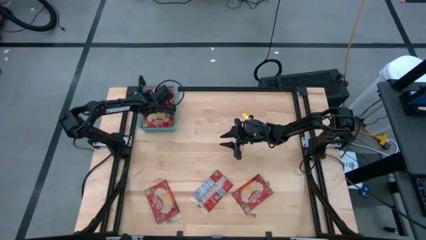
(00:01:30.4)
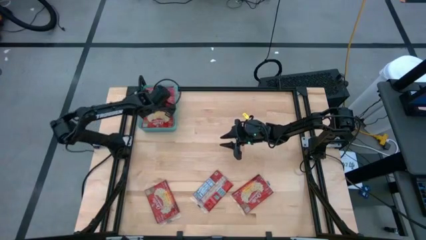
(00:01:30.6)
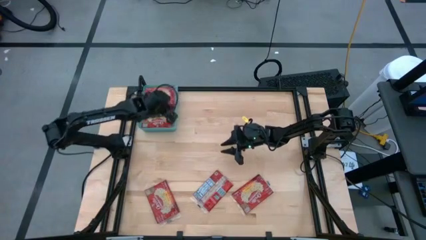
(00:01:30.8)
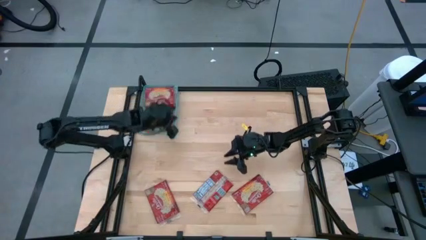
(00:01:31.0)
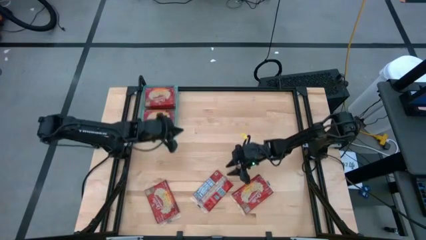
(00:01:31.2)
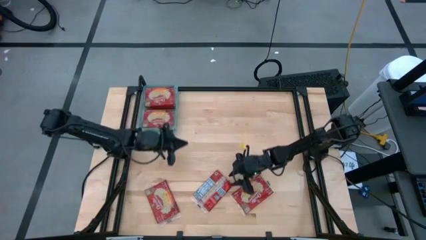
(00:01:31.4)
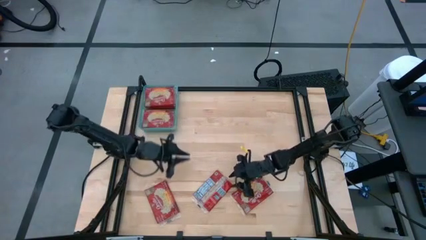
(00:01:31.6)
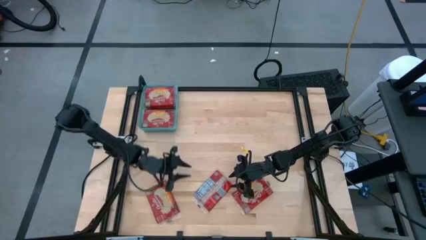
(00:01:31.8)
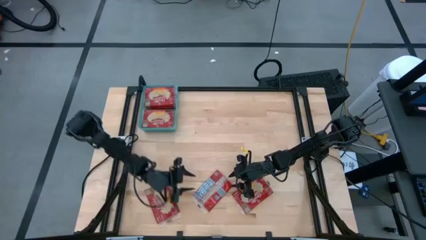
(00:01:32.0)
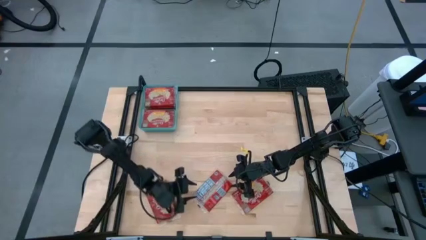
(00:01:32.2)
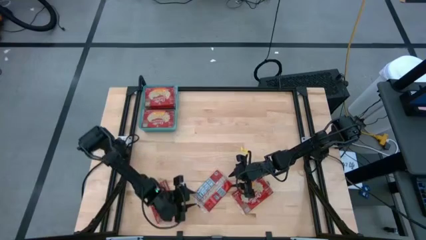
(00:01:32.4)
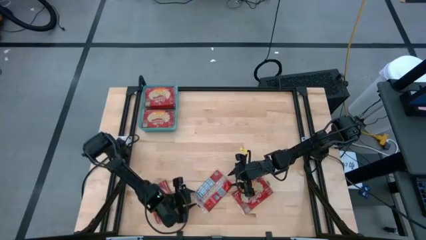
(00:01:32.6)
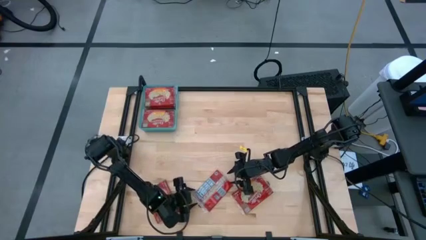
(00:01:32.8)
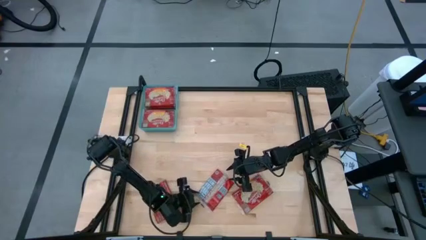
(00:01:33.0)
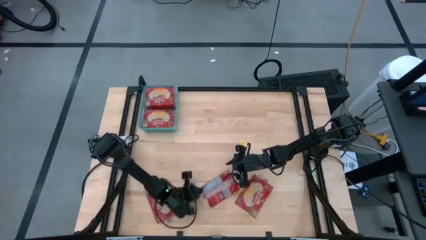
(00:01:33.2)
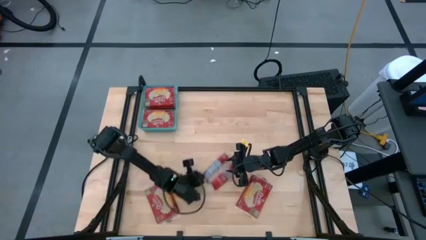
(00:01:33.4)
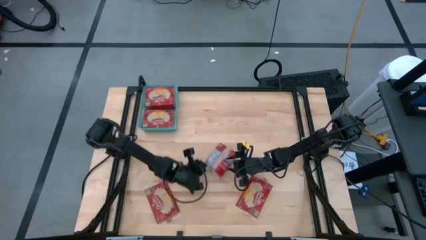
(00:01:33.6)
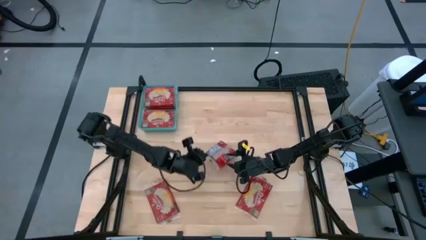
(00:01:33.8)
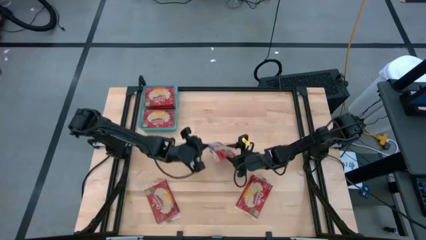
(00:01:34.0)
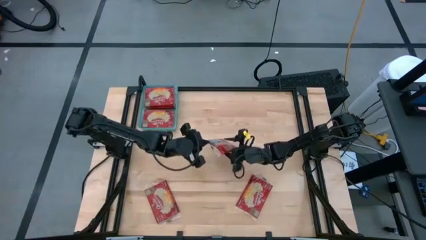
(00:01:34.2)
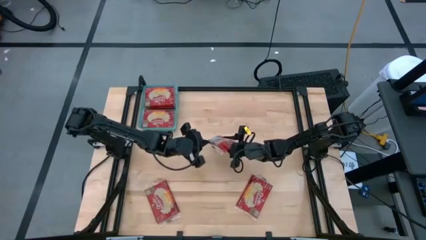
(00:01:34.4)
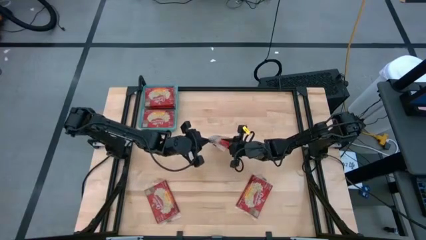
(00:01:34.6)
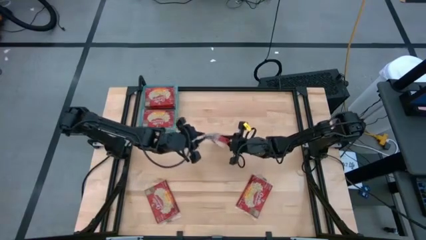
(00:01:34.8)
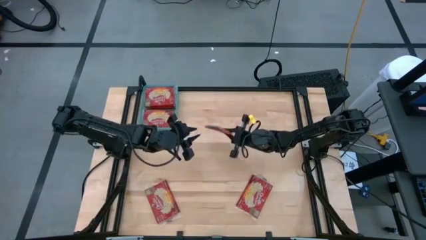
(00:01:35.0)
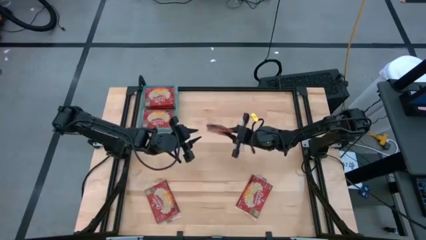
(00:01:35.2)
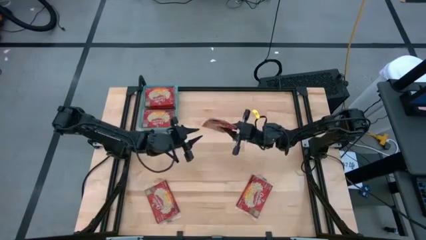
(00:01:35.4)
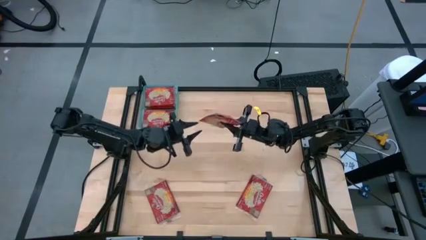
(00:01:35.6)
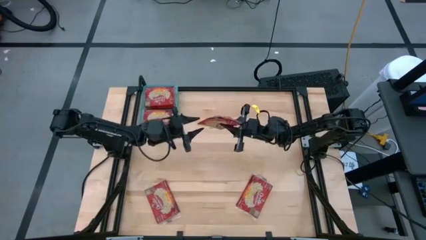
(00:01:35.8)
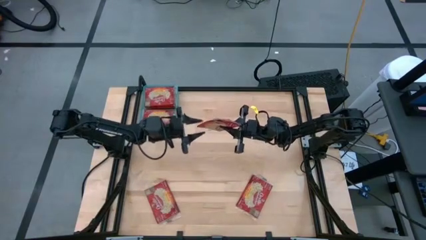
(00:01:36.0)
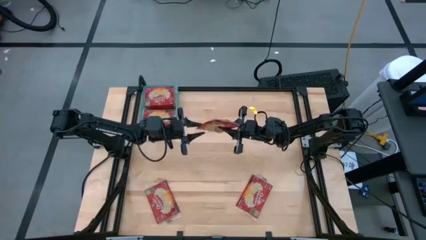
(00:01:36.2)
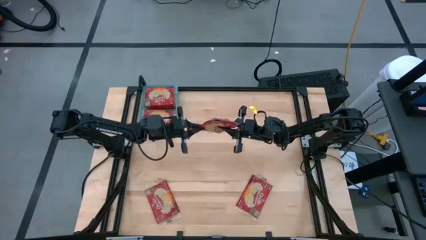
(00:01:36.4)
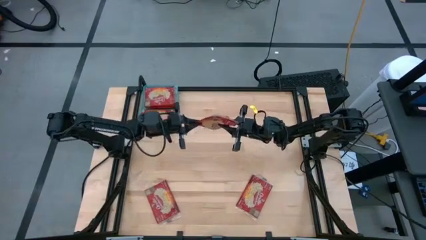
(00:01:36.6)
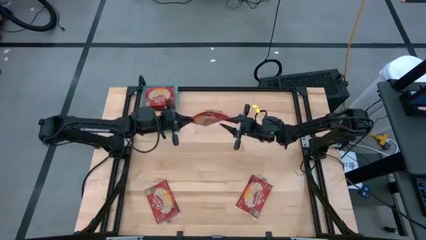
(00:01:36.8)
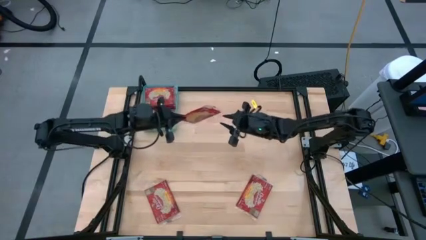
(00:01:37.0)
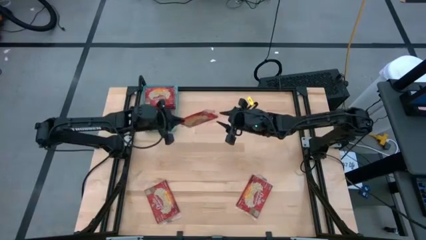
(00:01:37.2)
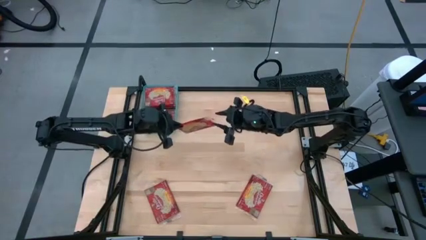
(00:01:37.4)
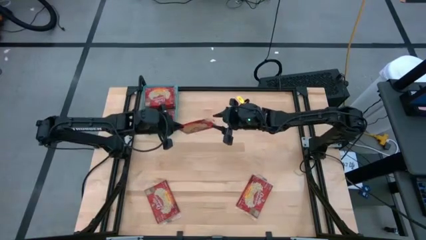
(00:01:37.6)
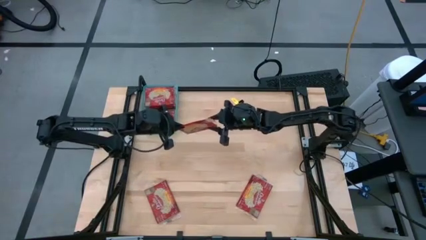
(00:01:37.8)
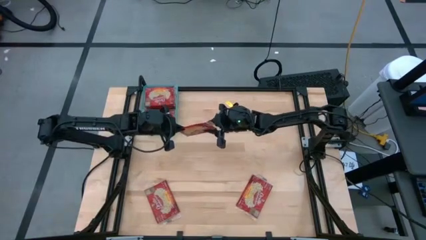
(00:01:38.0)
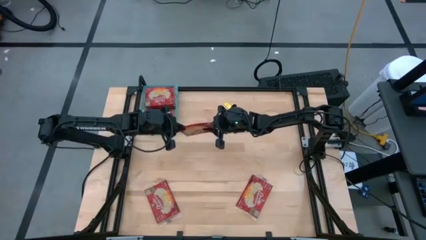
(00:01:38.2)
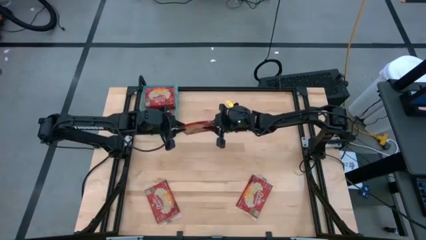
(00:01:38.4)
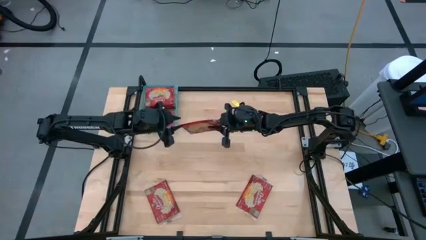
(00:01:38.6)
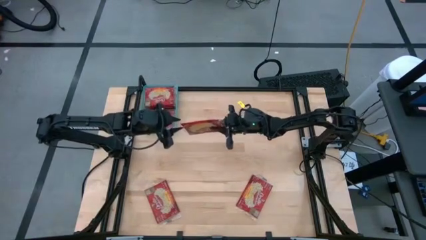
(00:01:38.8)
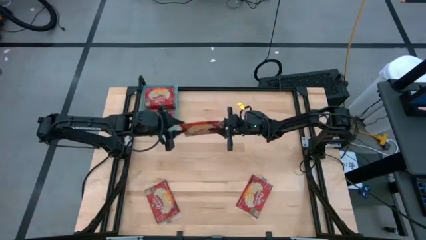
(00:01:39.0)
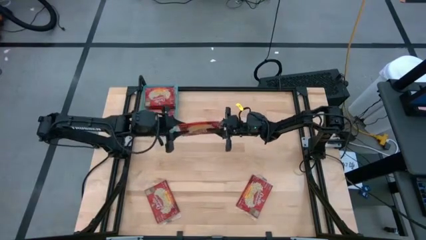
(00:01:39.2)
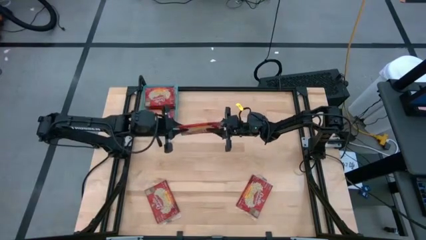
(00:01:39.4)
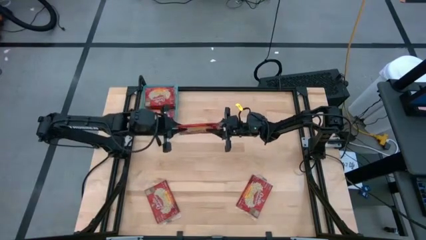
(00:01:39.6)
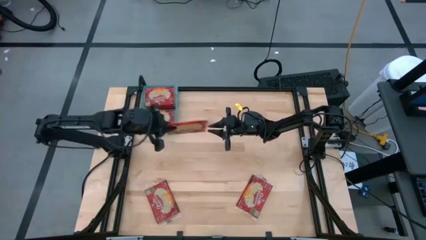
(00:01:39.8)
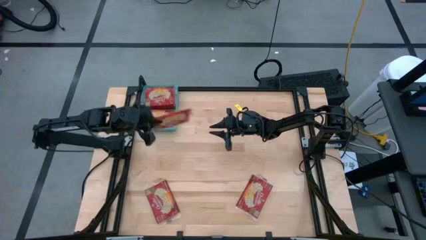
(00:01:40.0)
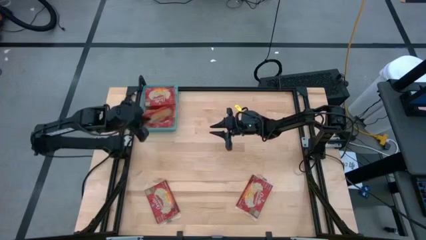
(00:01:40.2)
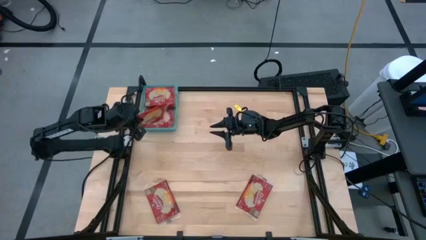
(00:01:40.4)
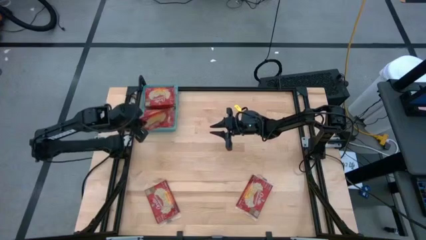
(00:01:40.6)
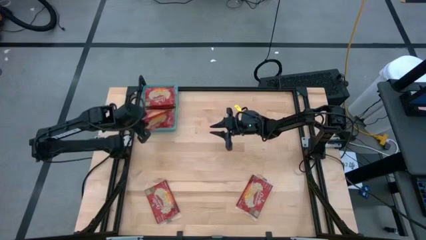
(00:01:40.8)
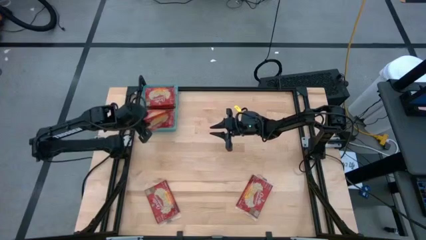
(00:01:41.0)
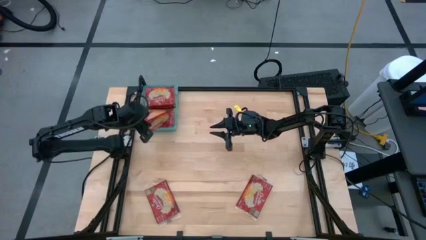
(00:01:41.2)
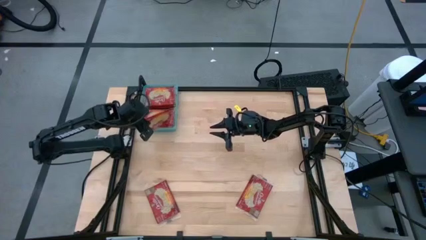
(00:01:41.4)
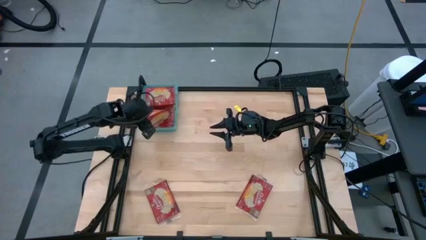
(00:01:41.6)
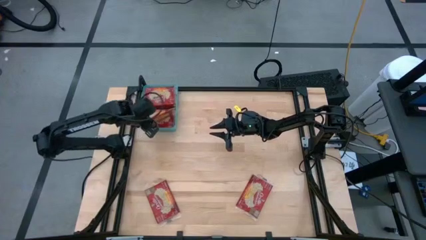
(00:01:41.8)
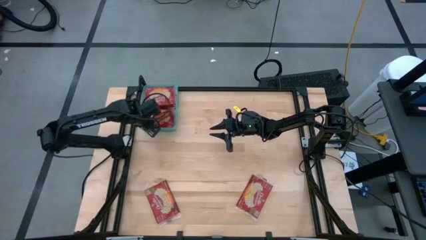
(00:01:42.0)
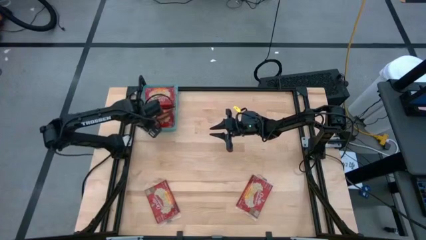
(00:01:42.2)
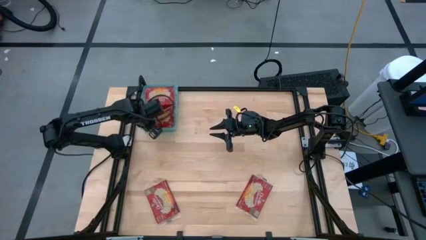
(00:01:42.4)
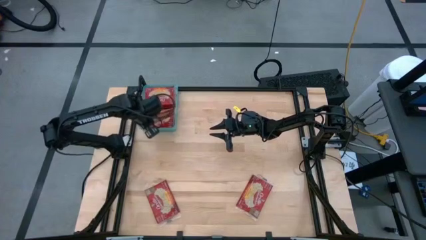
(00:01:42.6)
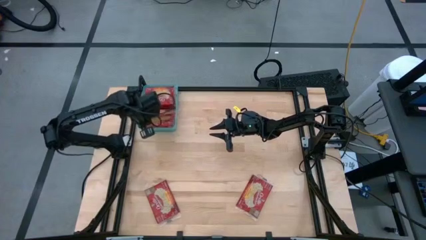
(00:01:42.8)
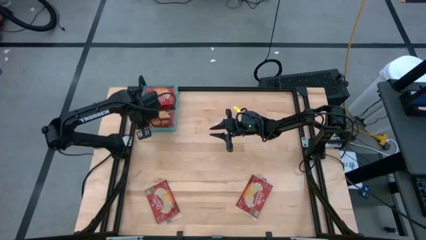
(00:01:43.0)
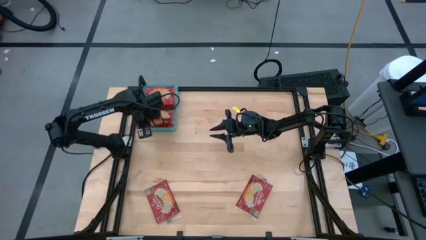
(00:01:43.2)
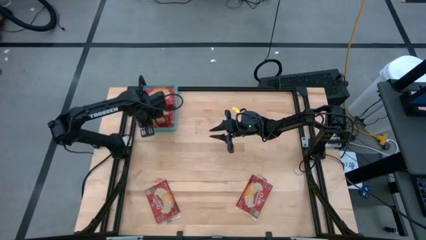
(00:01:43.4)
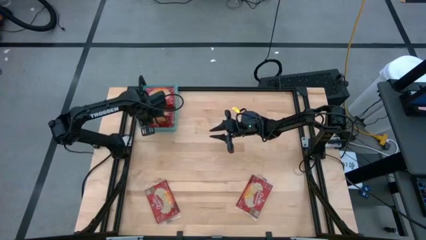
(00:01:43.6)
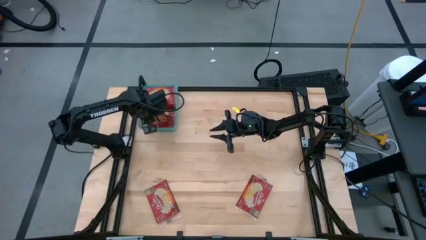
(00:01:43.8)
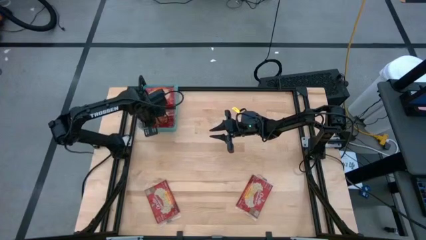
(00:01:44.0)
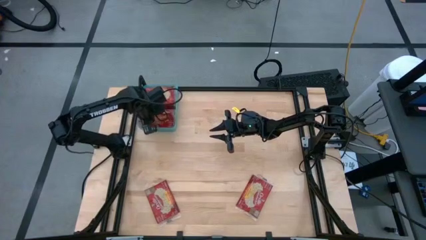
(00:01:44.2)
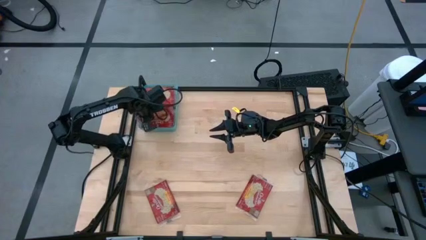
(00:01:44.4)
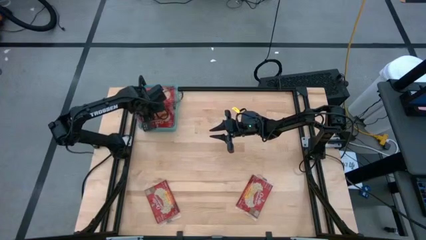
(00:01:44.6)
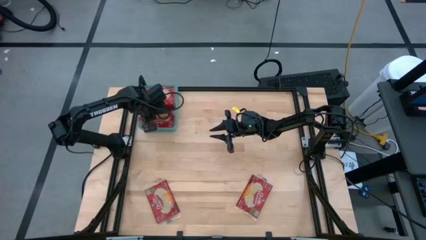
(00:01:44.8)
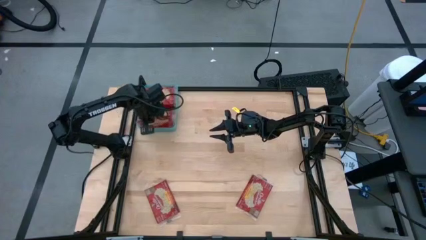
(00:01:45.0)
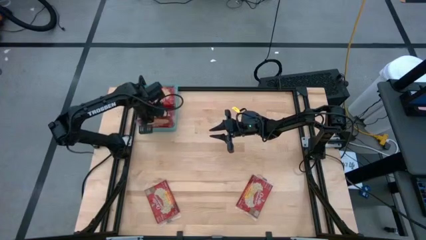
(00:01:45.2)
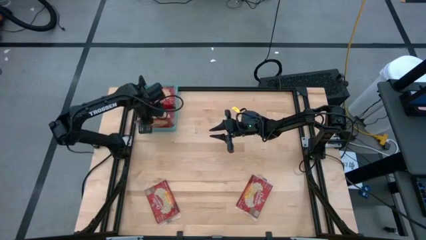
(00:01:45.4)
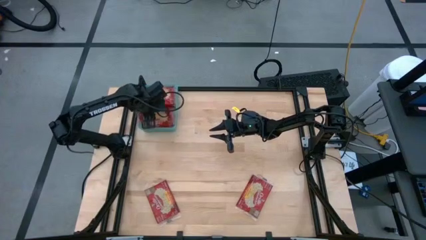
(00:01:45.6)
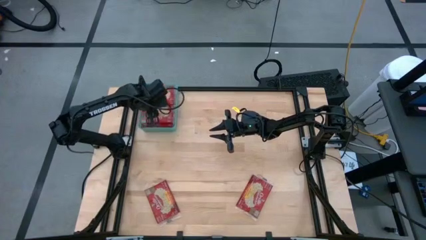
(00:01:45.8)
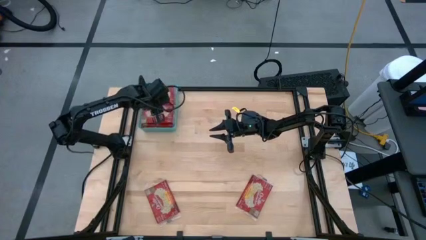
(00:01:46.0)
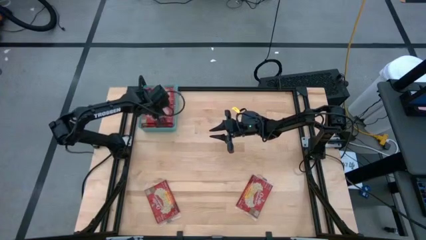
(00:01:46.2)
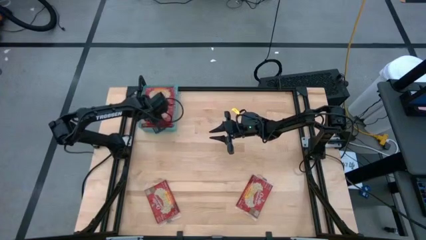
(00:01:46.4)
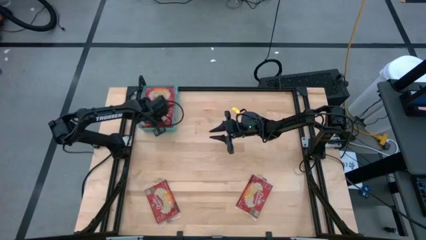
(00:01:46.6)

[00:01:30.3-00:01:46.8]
Task: Sort popcorn bags into baskets
Put the popcorn bag into the blue bin
